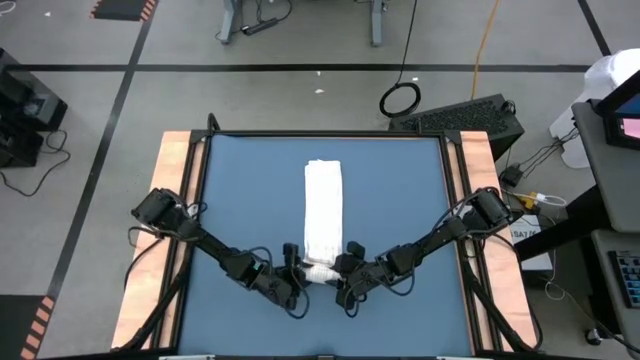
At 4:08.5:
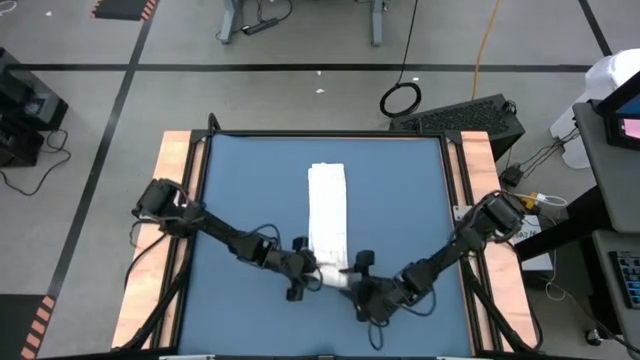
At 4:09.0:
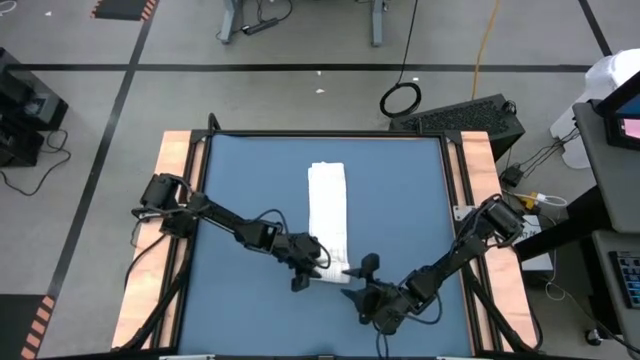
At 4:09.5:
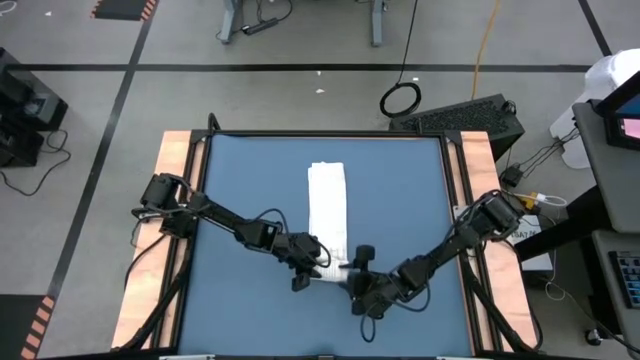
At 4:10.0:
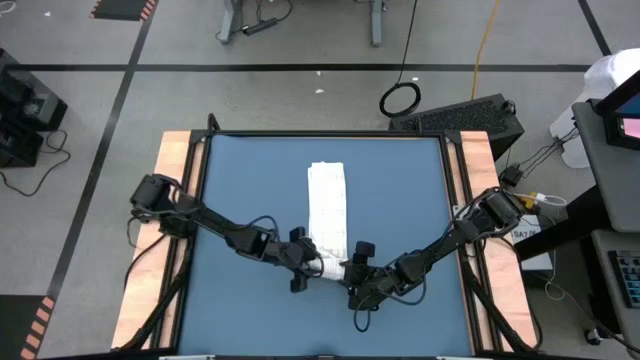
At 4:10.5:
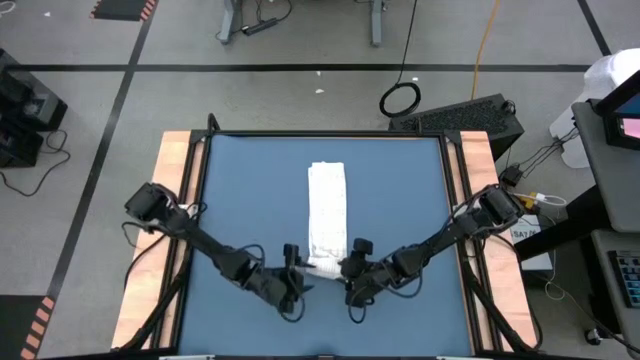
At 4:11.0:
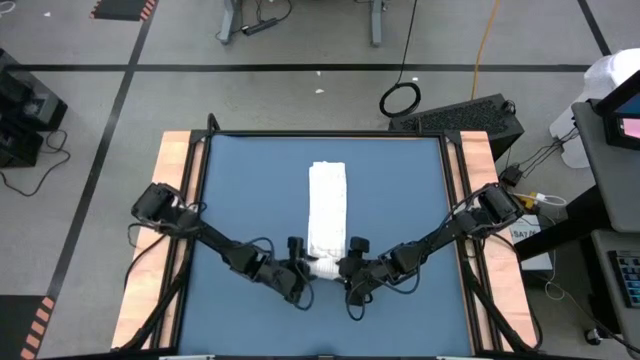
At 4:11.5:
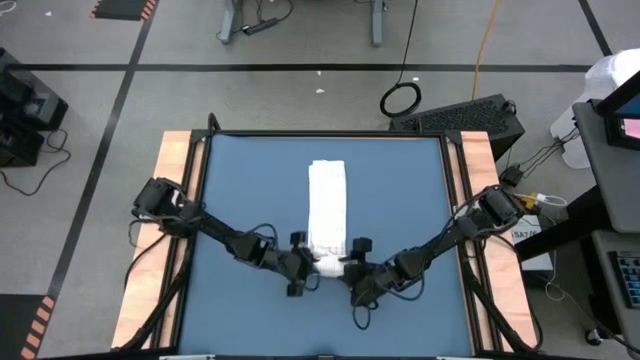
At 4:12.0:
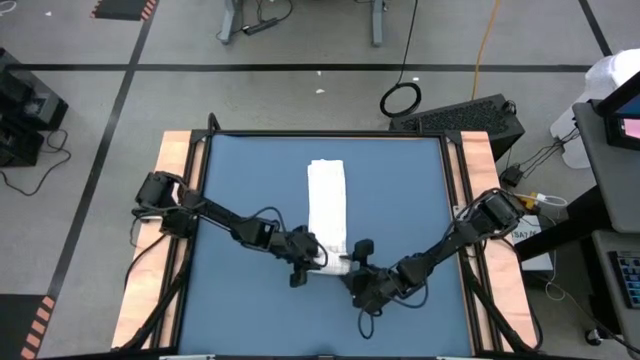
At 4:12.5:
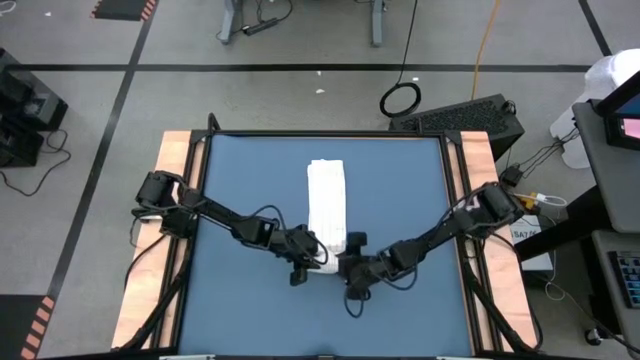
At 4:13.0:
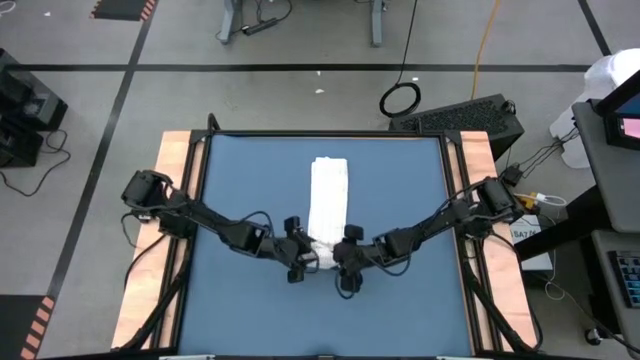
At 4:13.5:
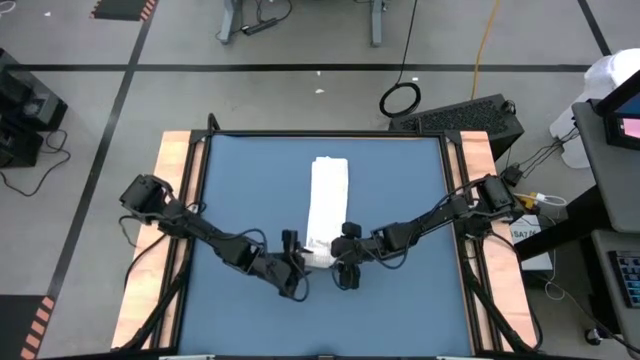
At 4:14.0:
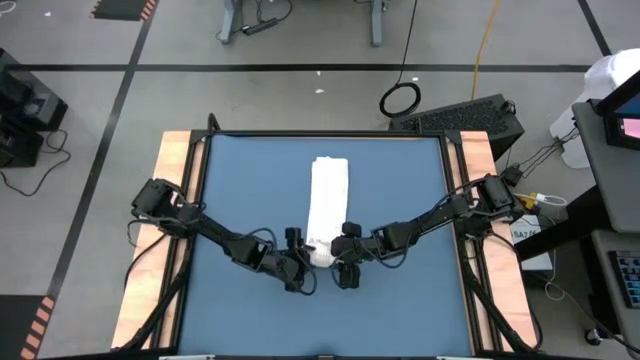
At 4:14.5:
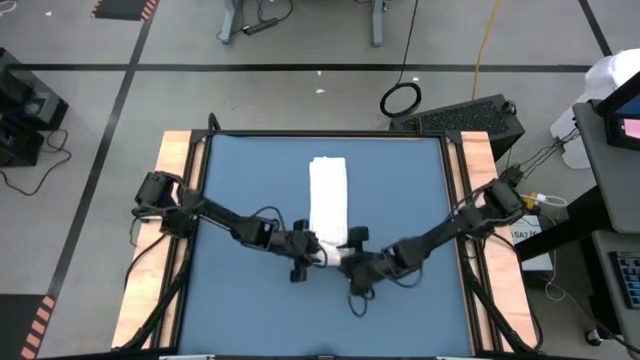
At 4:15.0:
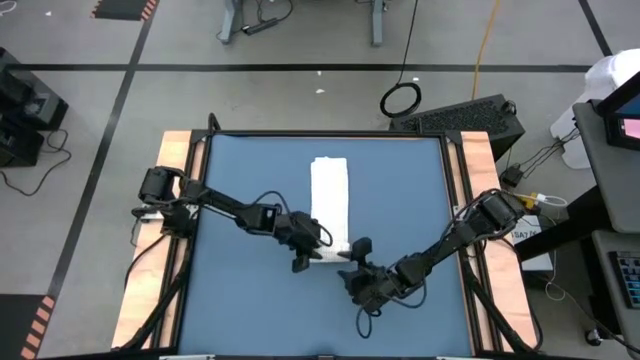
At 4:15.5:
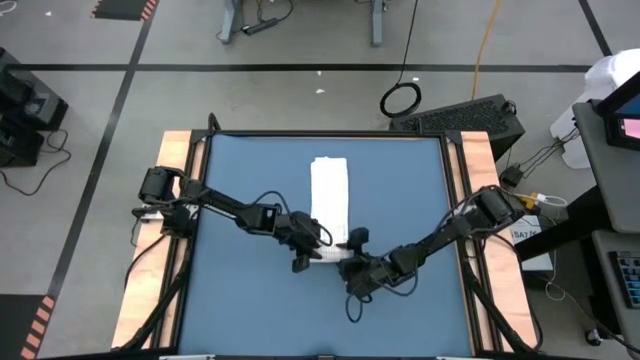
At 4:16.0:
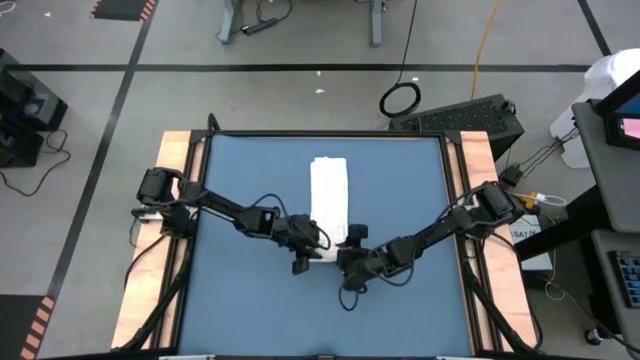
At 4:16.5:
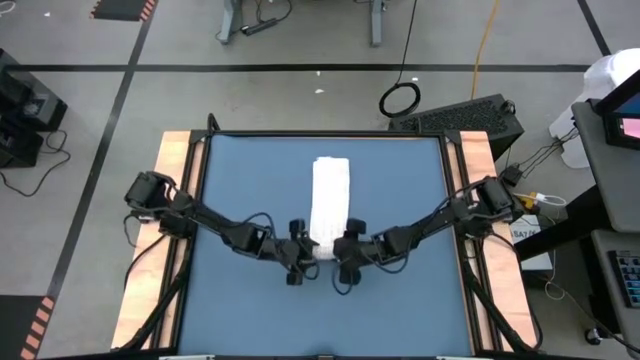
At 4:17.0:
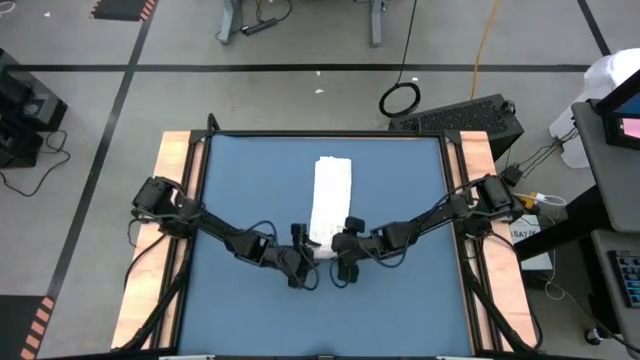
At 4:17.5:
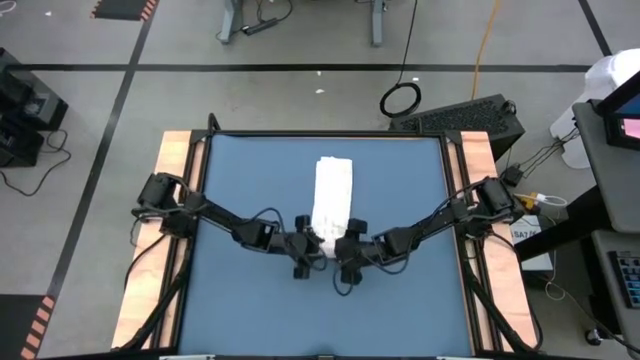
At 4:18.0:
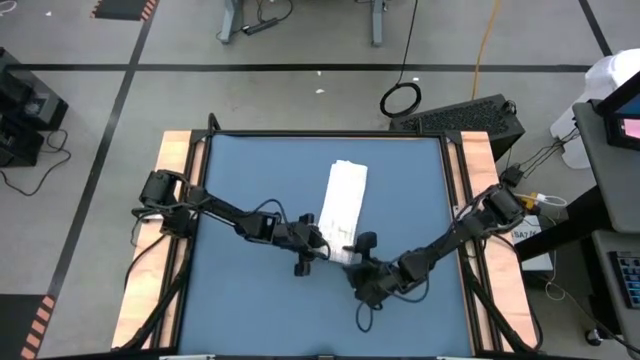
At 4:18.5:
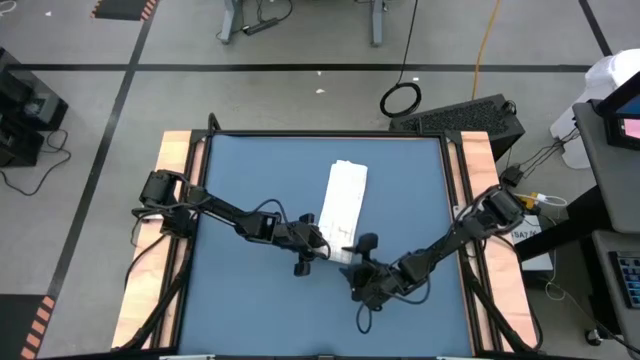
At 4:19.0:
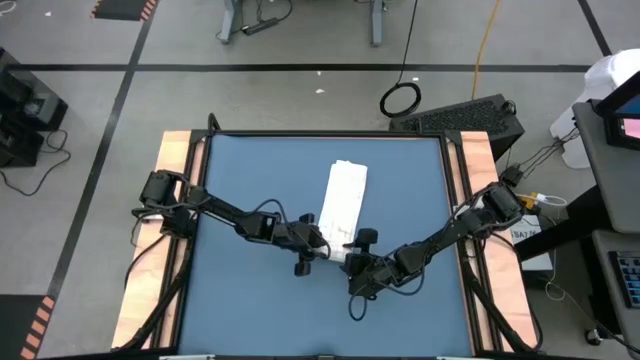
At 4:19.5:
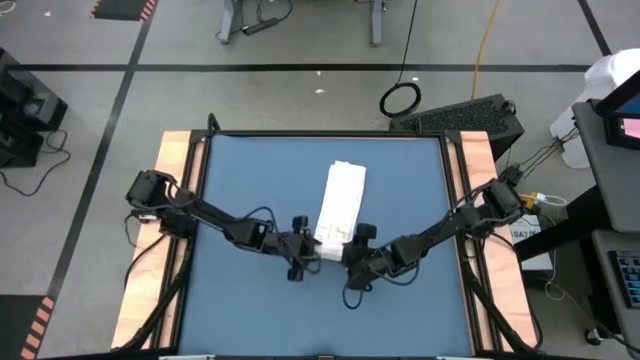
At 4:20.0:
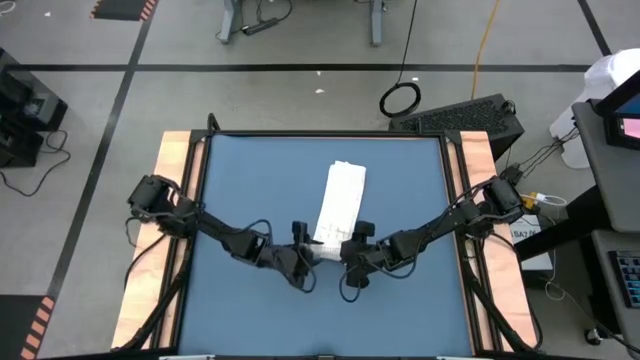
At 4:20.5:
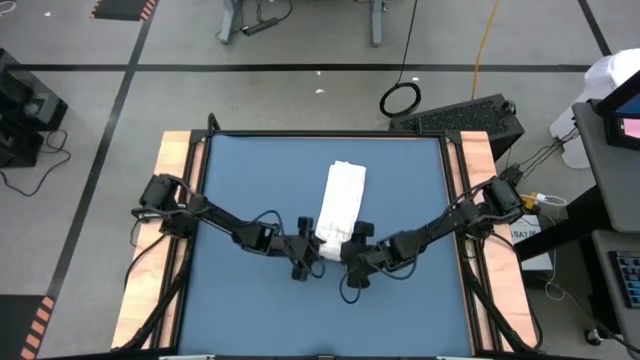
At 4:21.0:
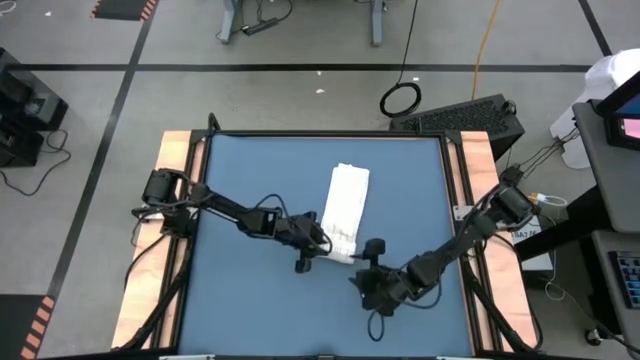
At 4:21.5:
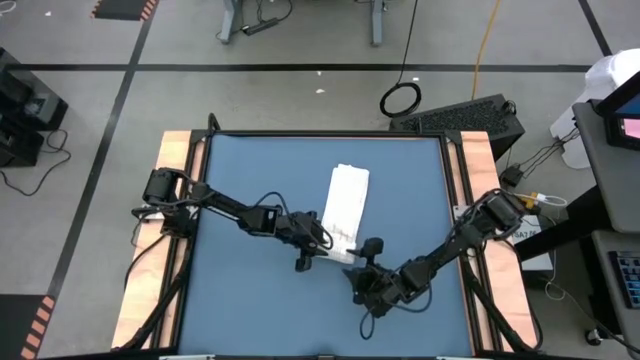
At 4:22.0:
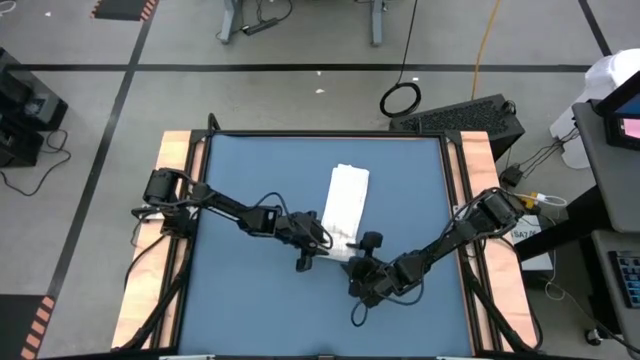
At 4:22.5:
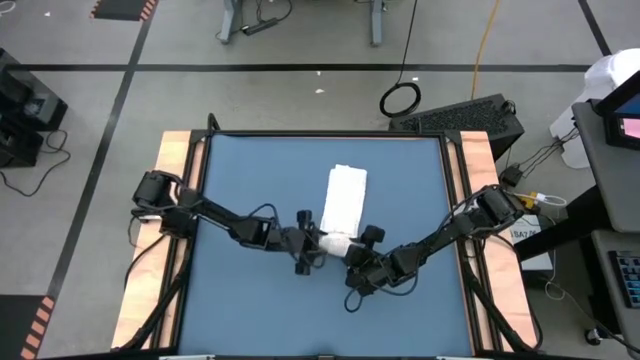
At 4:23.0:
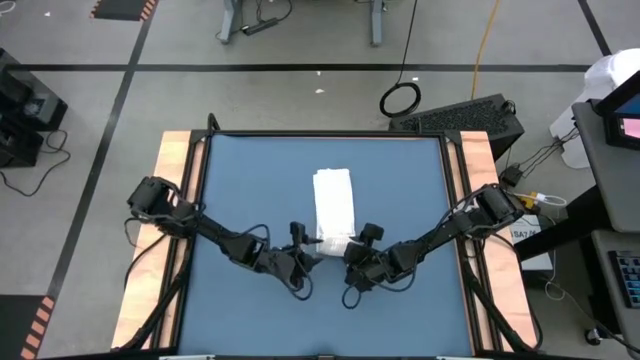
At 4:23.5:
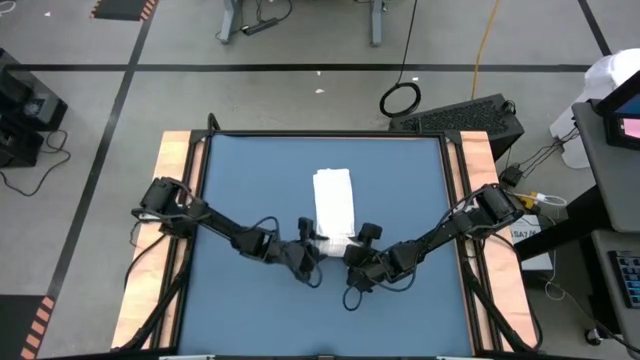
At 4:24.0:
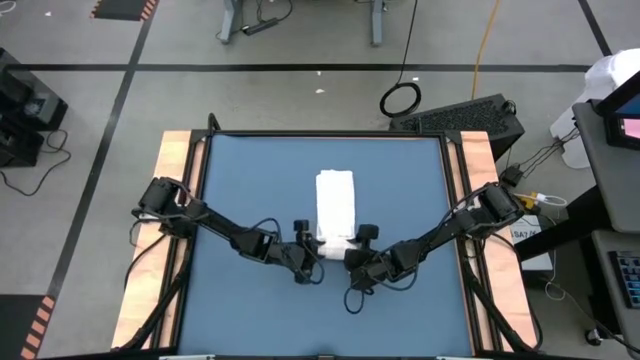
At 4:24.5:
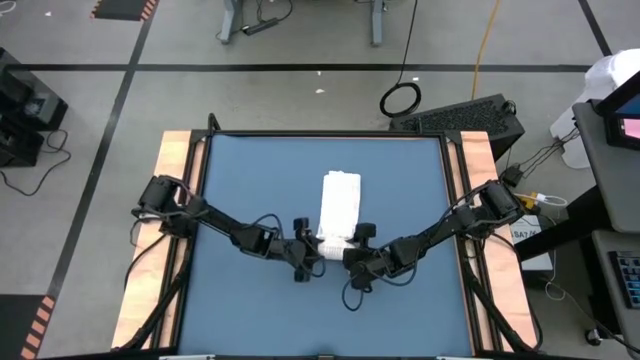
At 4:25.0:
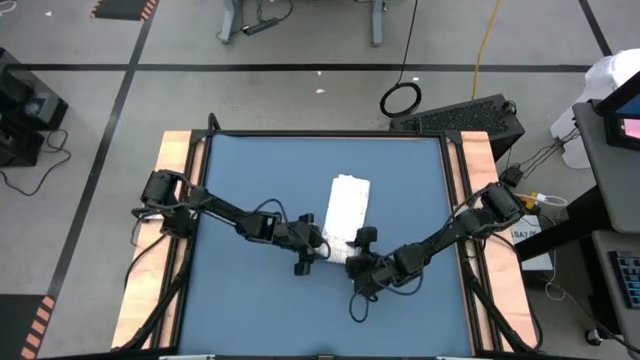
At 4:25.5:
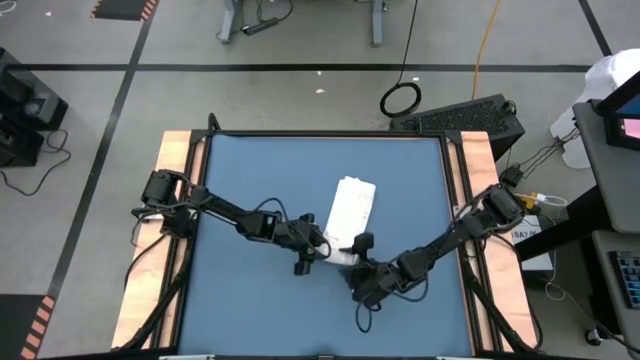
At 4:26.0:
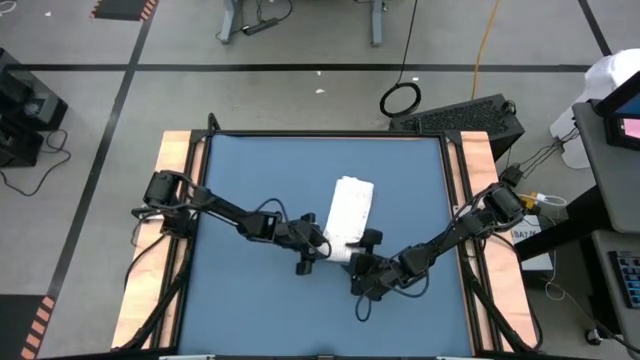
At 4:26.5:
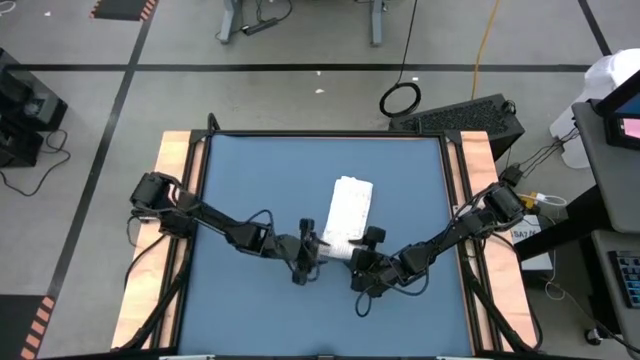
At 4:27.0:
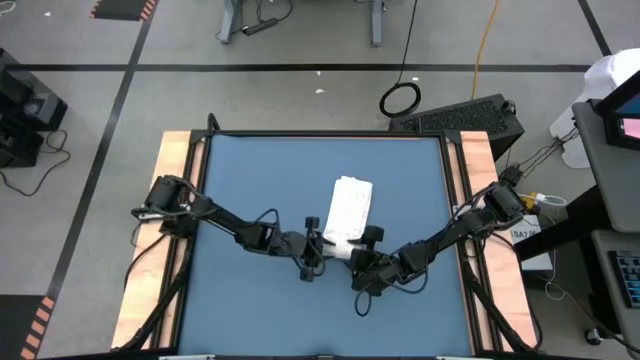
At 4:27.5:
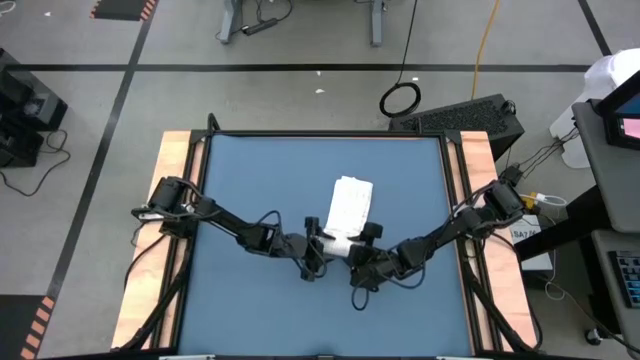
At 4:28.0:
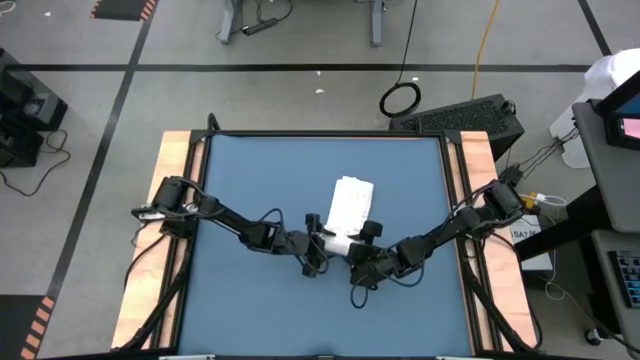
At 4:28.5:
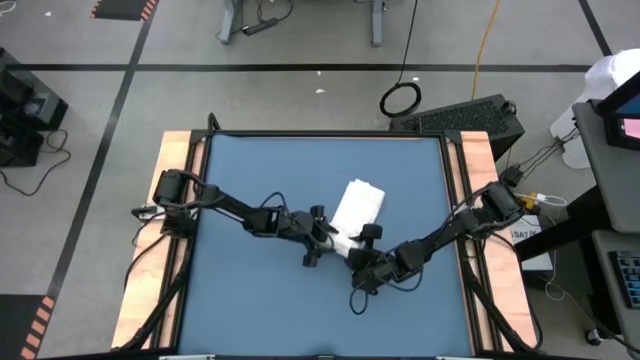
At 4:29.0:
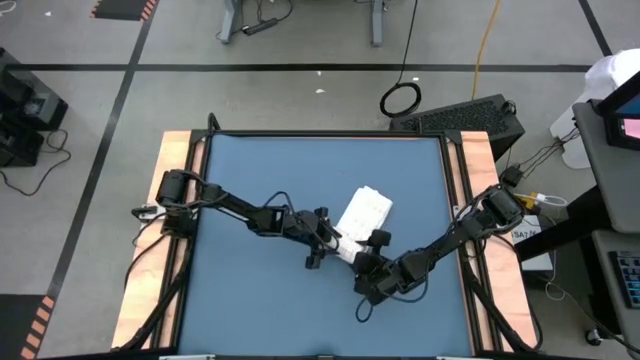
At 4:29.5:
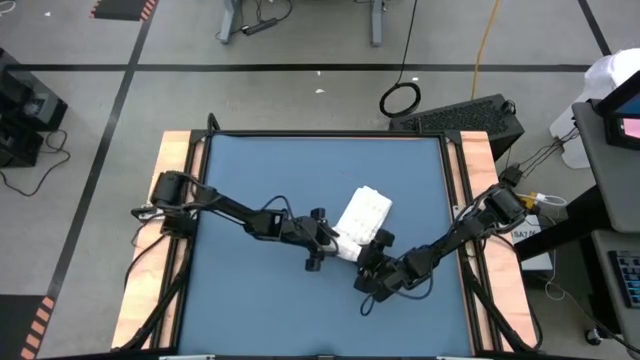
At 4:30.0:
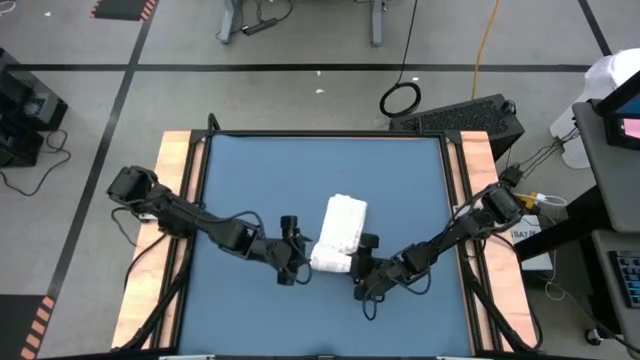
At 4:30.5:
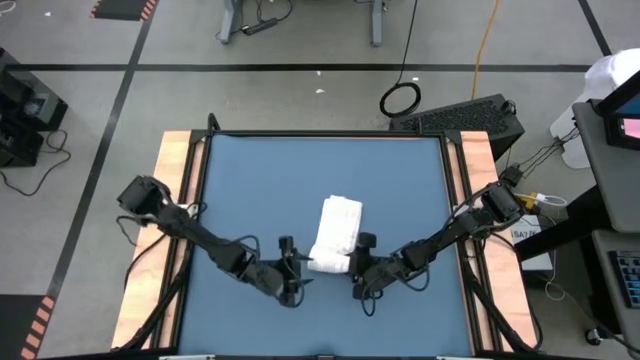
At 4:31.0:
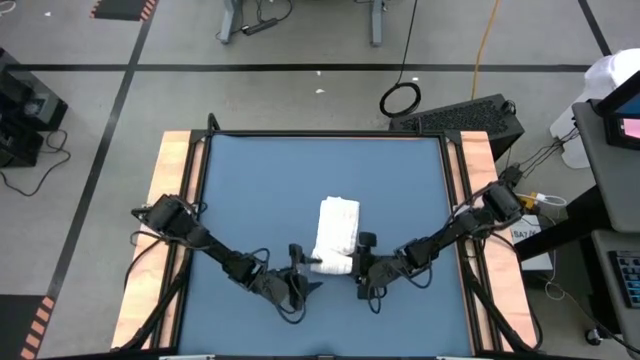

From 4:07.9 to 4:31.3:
Task: Roll towel into tight, uniform cylinder
Roll the white towel
